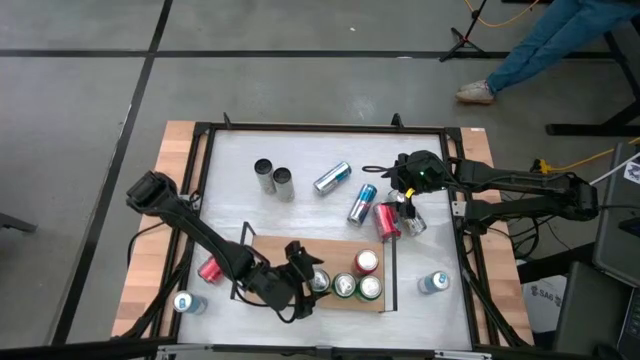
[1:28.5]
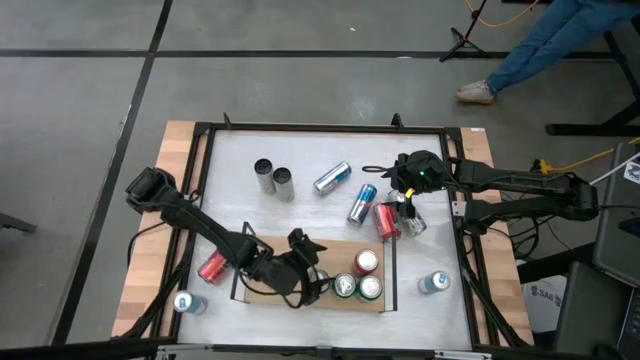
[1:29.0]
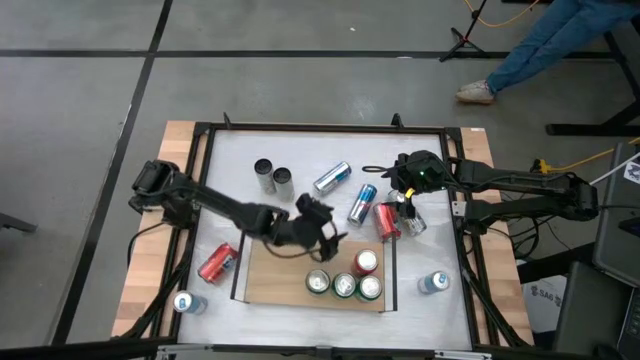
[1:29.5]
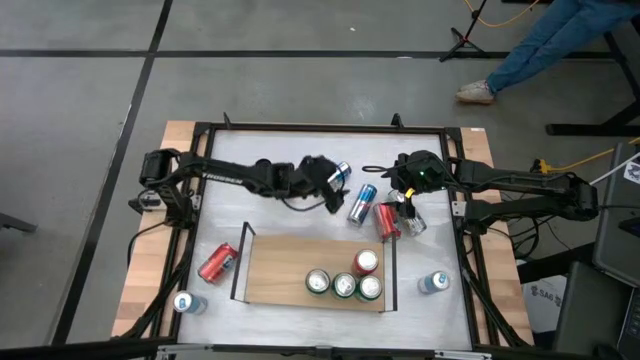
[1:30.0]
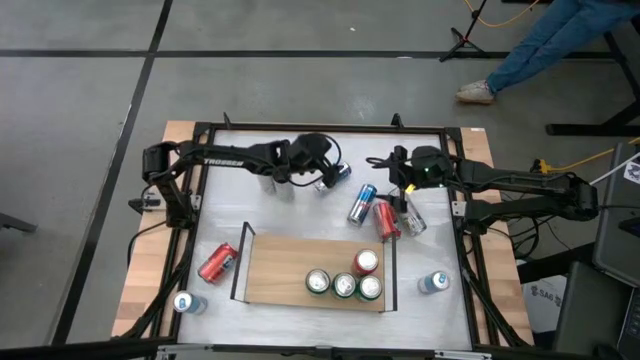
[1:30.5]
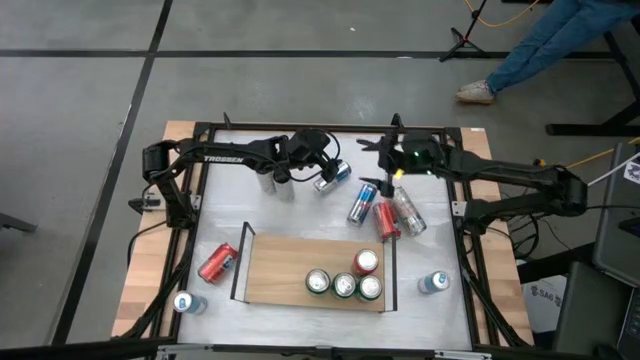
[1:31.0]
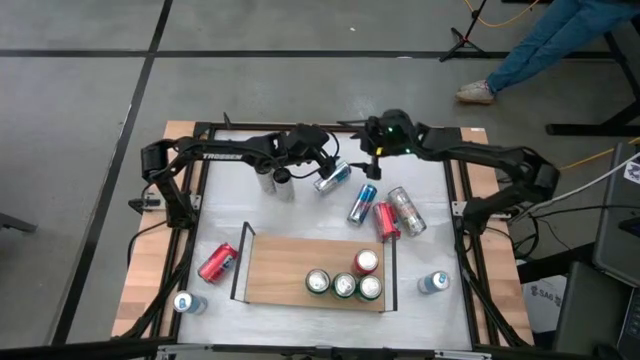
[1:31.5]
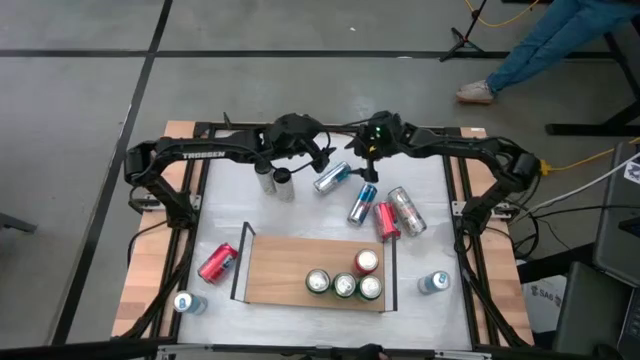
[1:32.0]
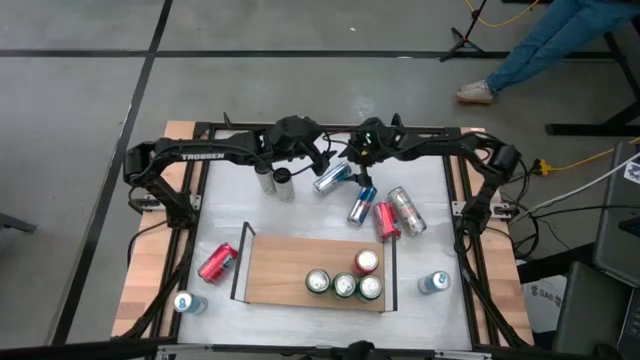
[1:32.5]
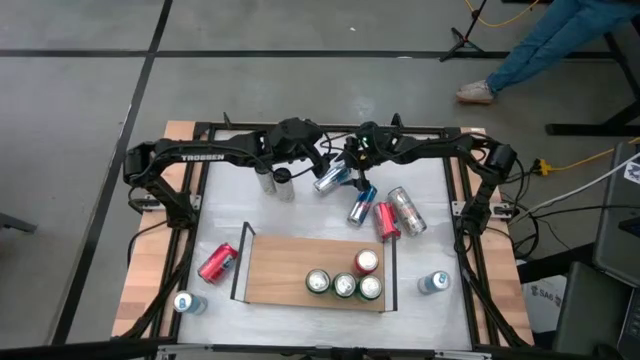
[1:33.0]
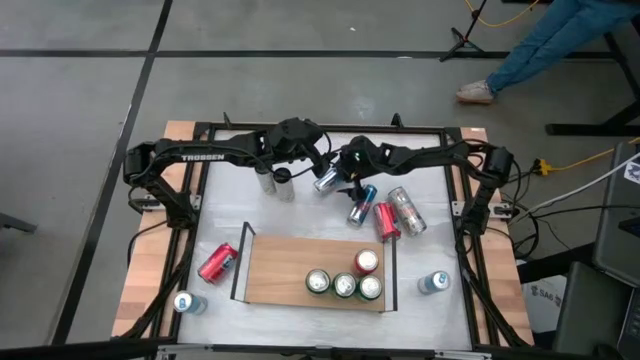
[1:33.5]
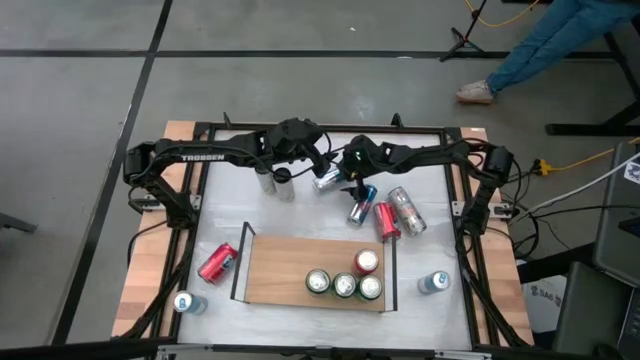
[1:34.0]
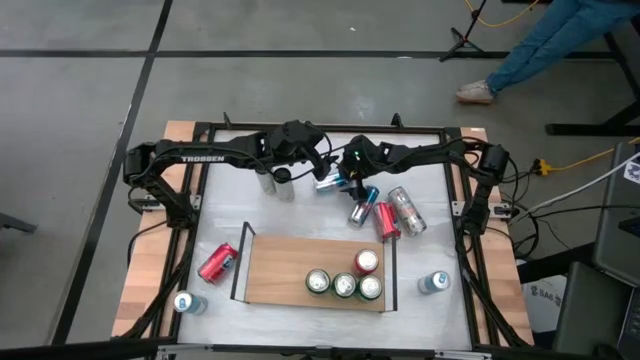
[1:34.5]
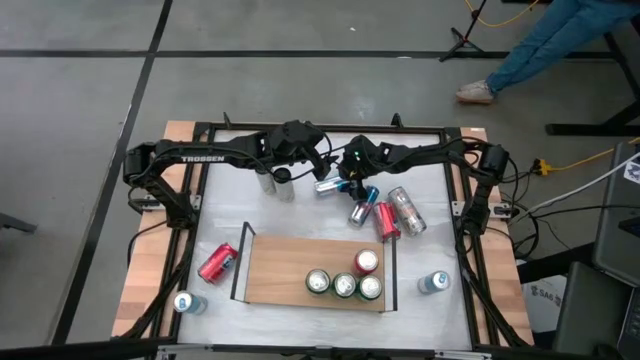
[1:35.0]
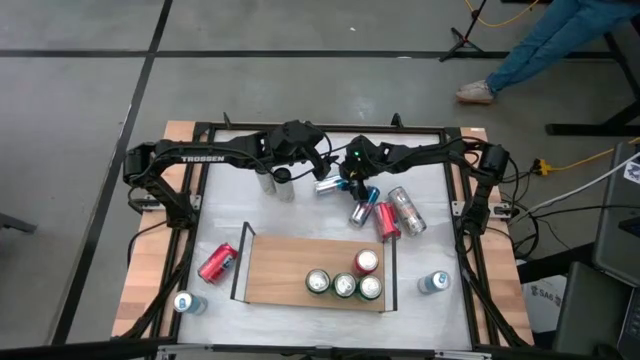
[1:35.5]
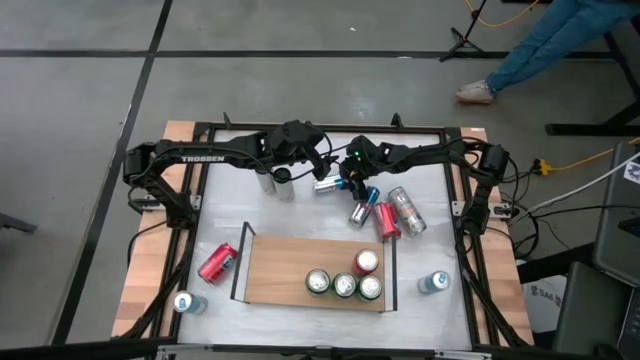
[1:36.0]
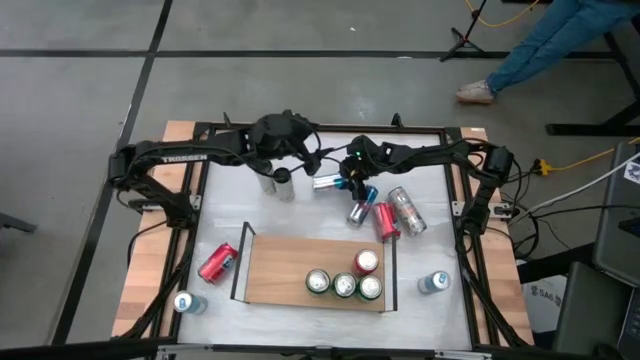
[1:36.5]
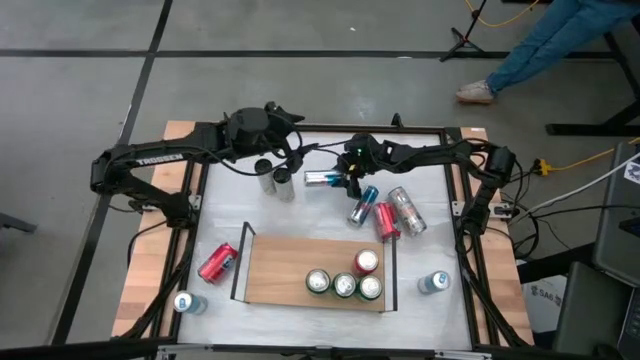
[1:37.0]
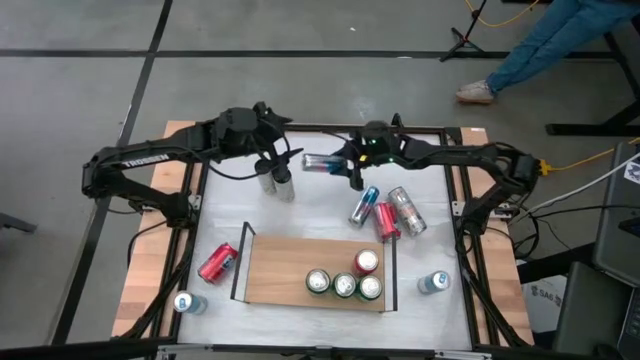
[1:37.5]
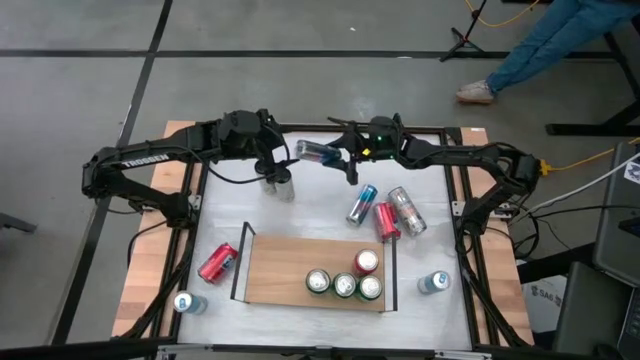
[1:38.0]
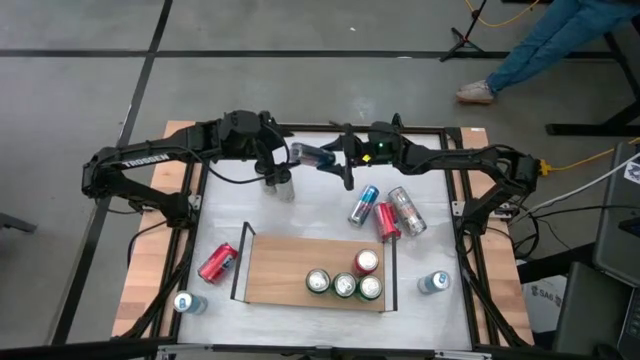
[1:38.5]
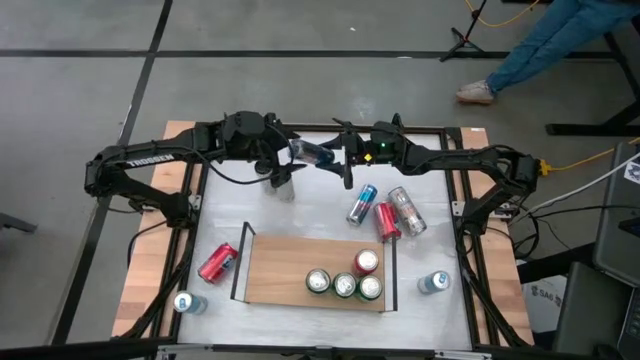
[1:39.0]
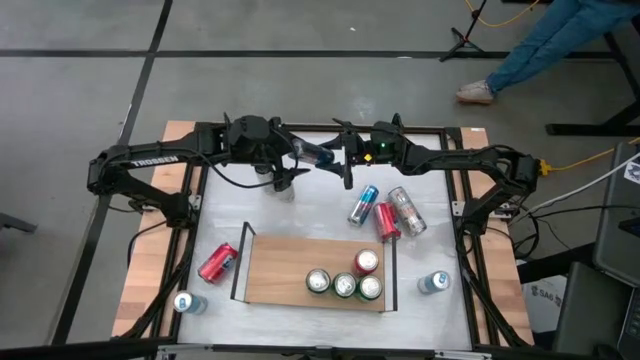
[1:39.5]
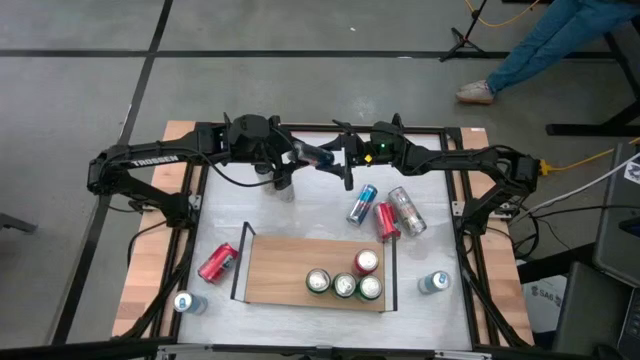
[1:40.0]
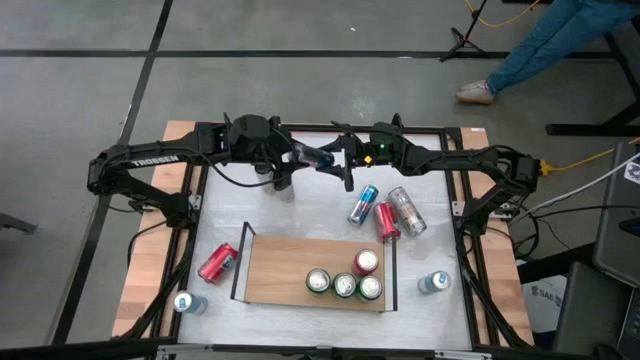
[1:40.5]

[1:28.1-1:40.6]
Task: Place canned beverage on shelf
Put the blue soda can on the shelf

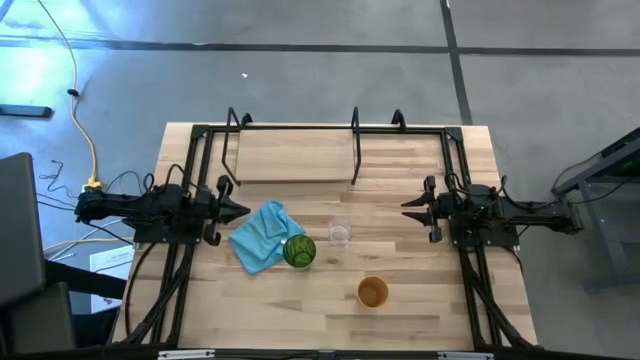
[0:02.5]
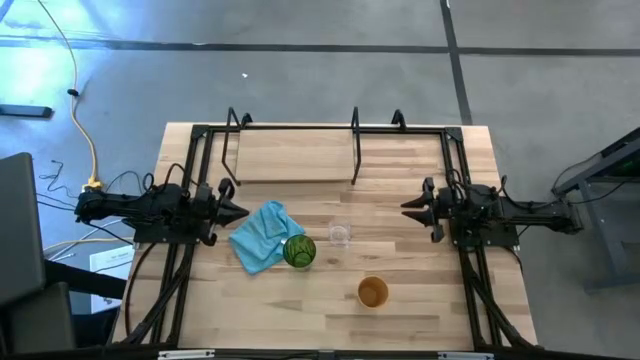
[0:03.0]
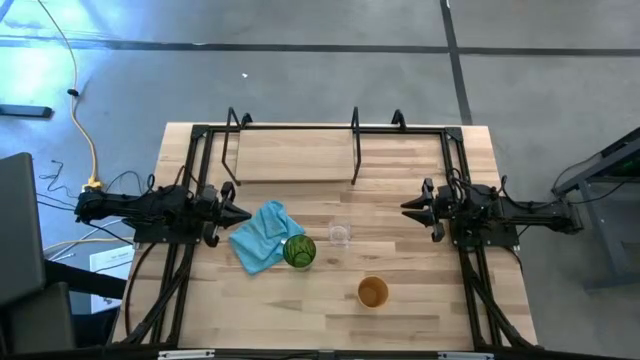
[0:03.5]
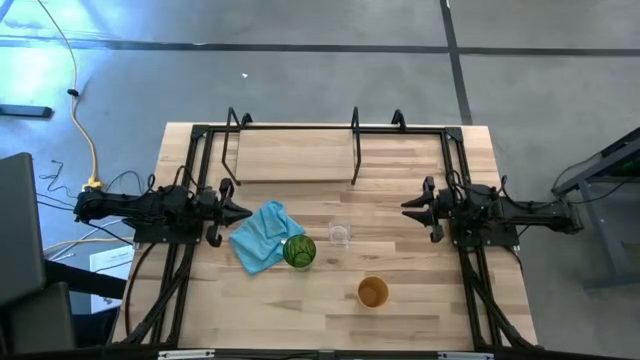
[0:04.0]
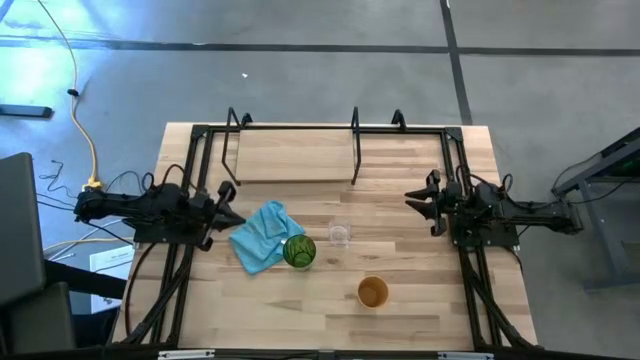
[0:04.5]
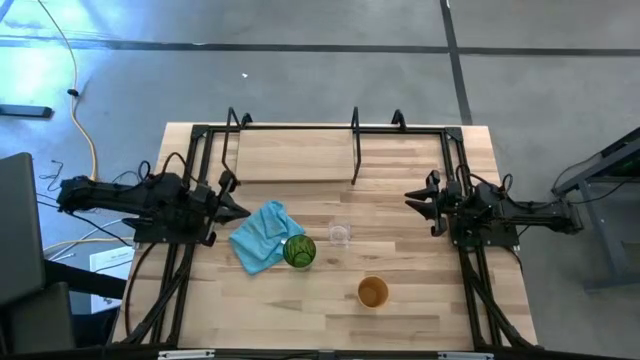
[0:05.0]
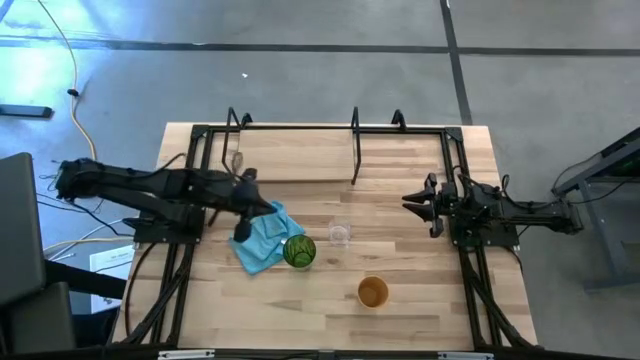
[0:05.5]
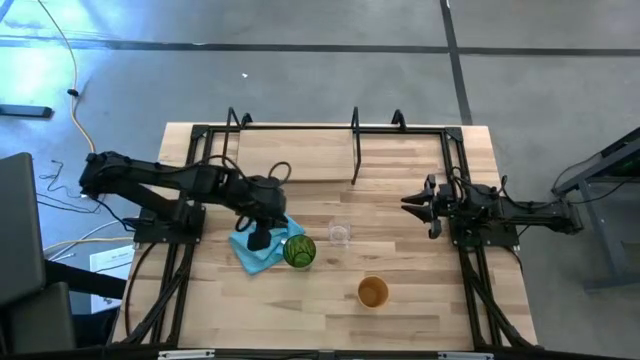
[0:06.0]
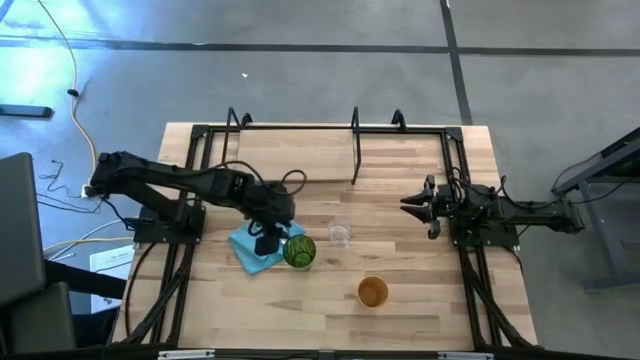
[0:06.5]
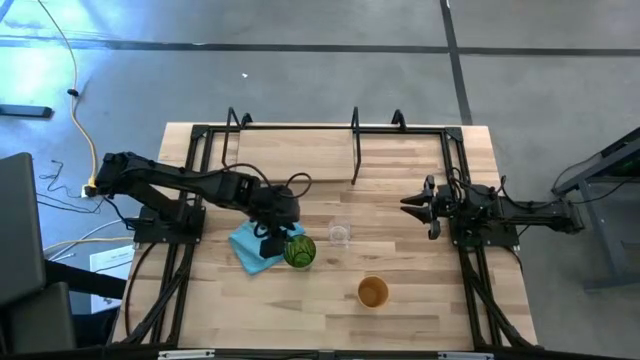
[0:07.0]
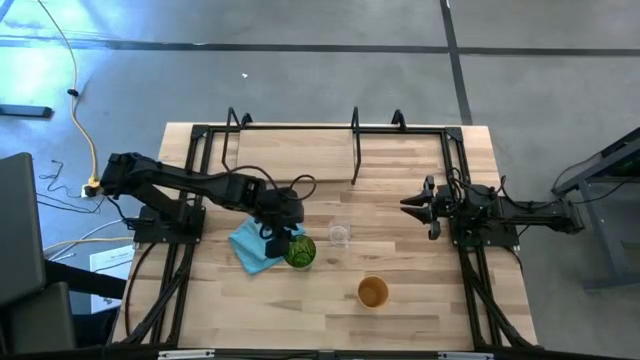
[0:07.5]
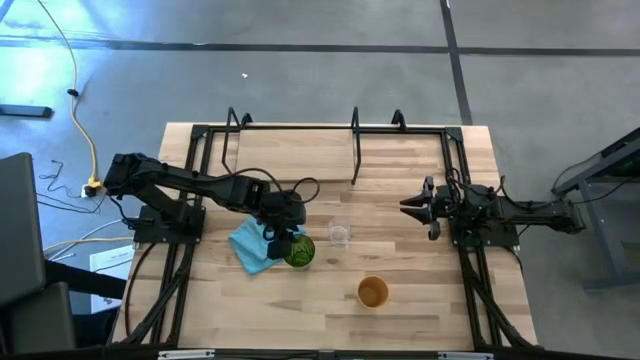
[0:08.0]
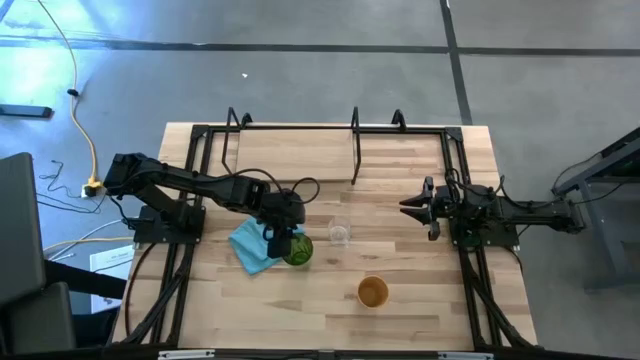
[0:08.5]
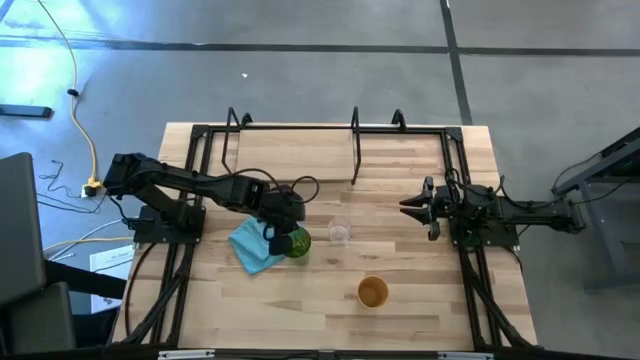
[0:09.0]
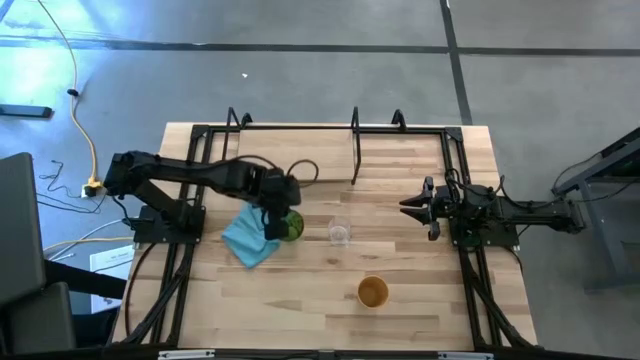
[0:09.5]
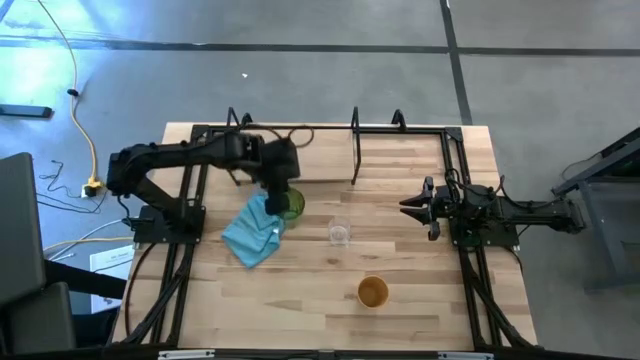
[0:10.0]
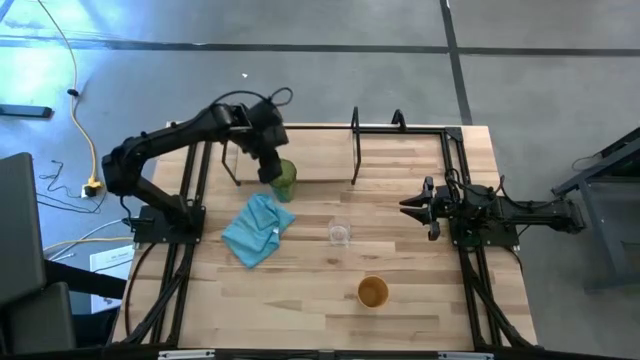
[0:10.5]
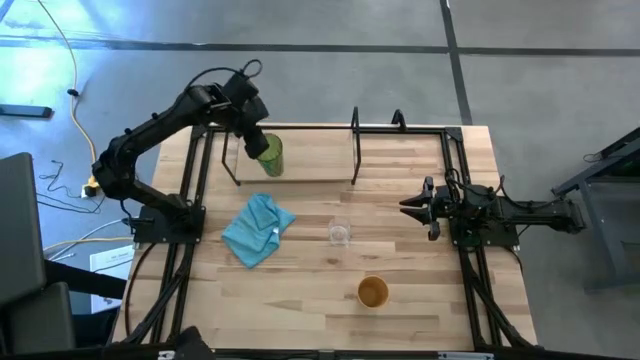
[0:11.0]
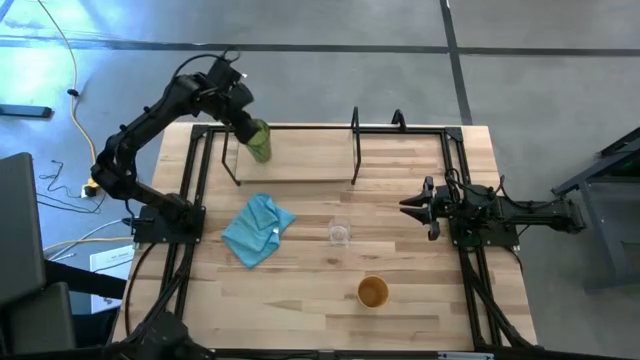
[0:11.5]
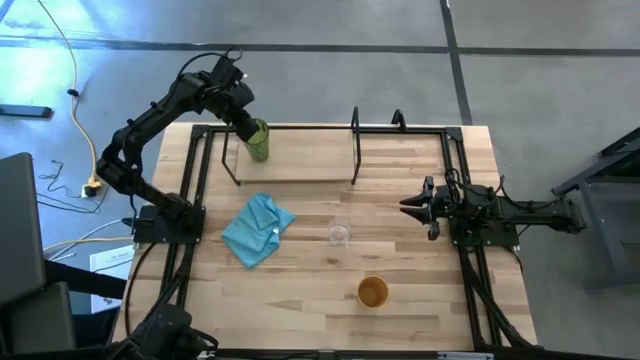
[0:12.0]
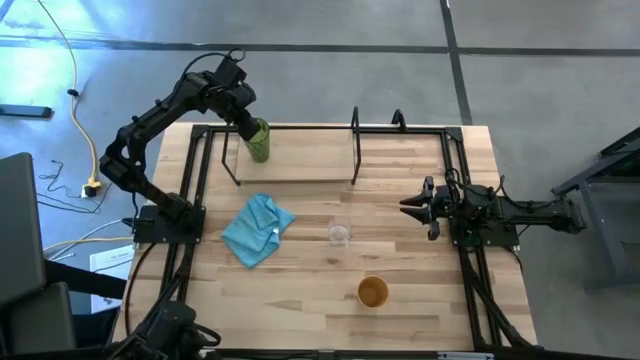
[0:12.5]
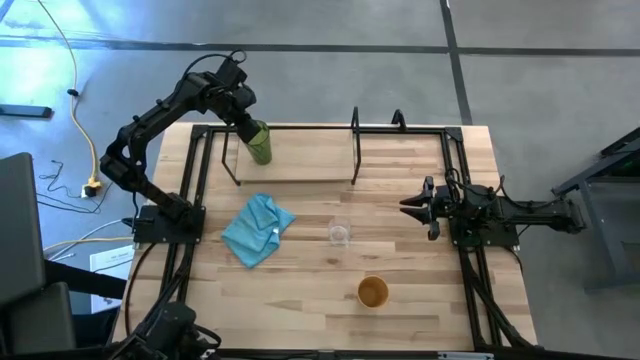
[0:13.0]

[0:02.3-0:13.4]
Task: Stack small to large cups/mugs on shelf
Put the green cup on the shelf
